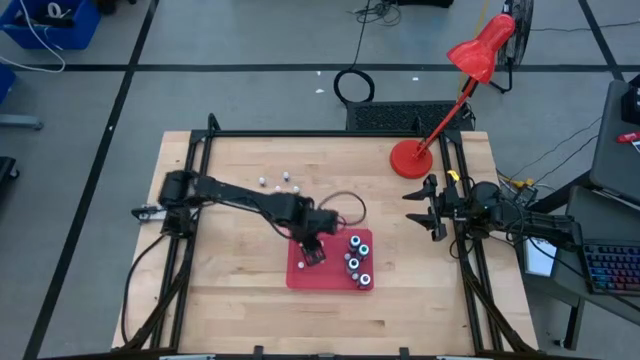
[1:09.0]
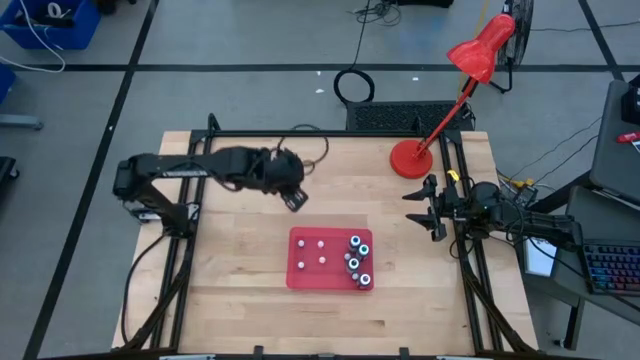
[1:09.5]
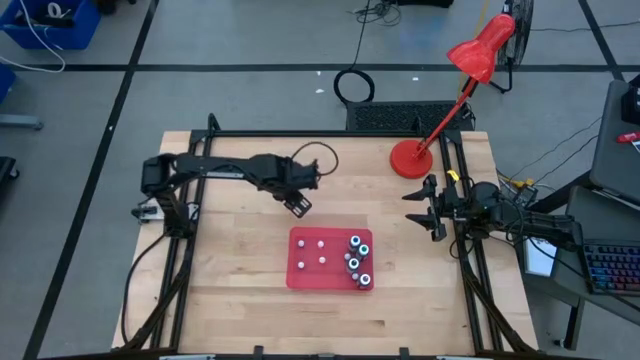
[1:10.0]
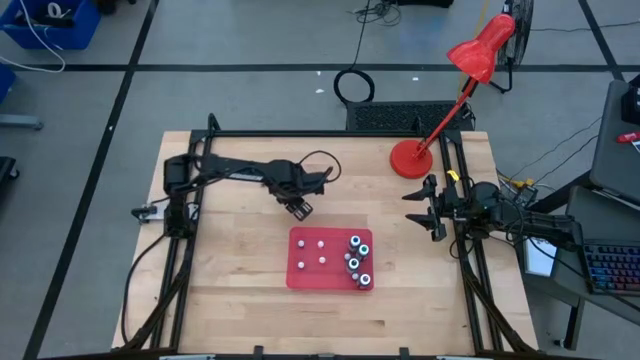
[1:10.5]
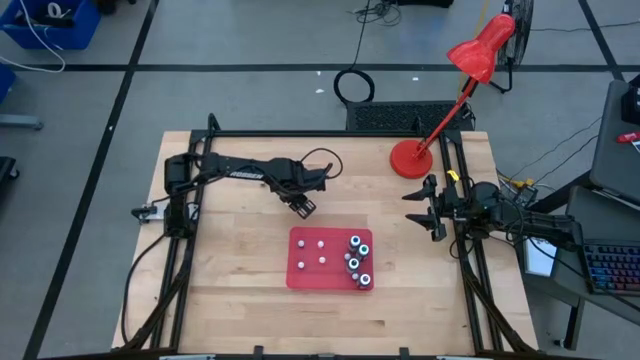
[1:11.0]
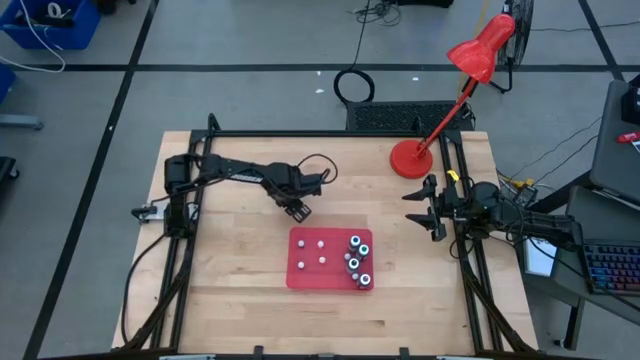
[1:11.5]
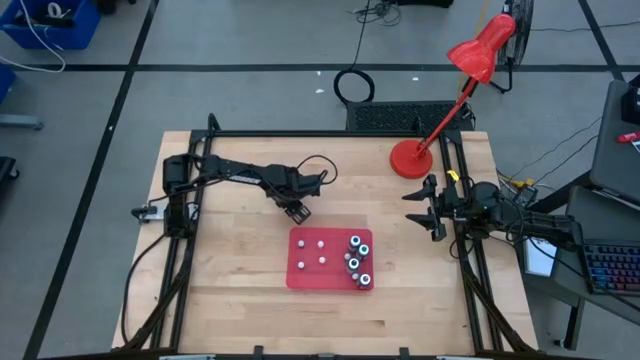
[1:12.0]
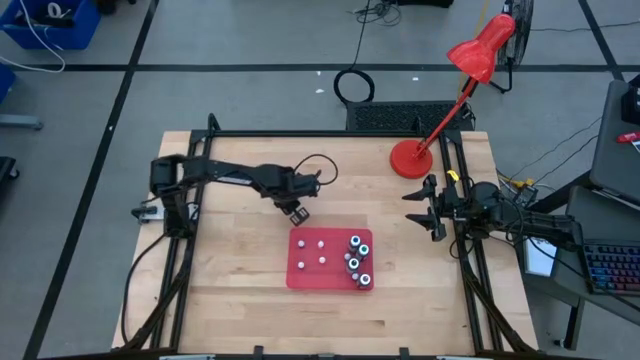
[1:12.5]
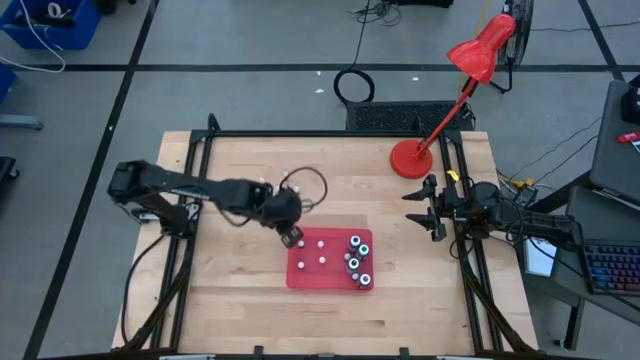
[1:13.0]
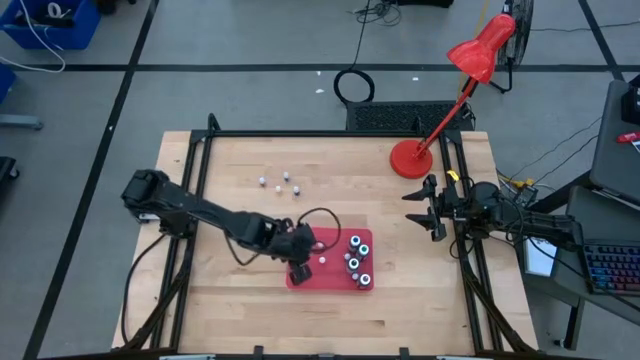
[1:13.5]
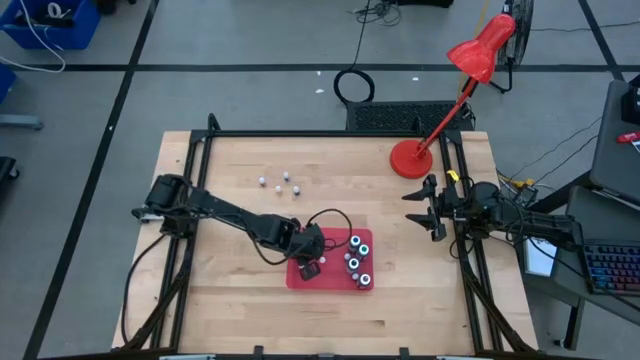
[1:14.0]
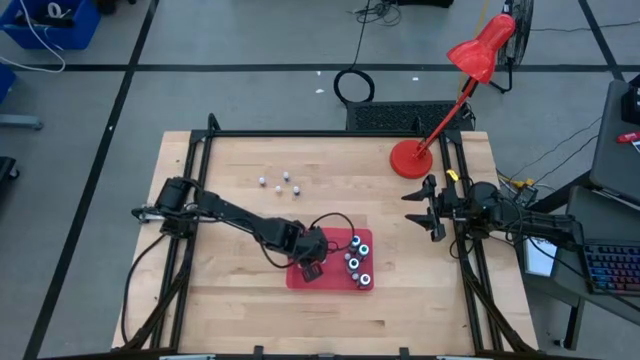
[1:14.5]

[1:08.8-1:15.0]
Task: Pick & Place food coloring
Put the small orange food coloring bottle into the bin

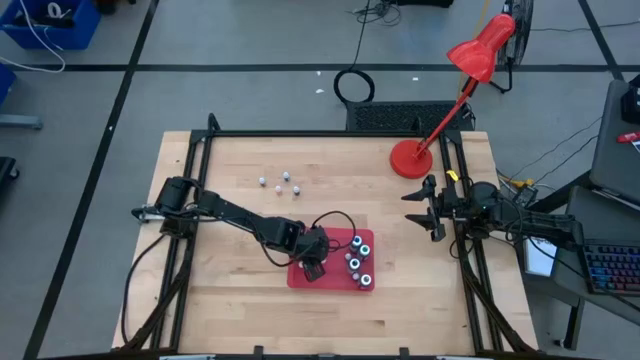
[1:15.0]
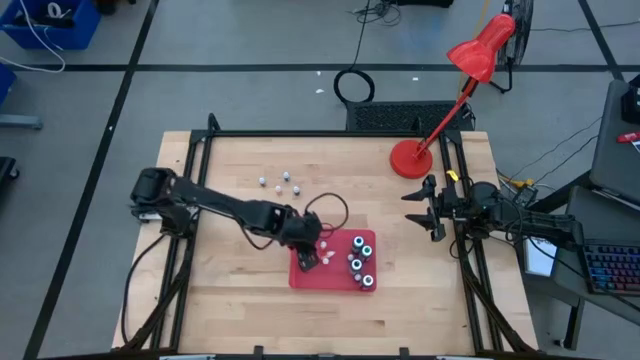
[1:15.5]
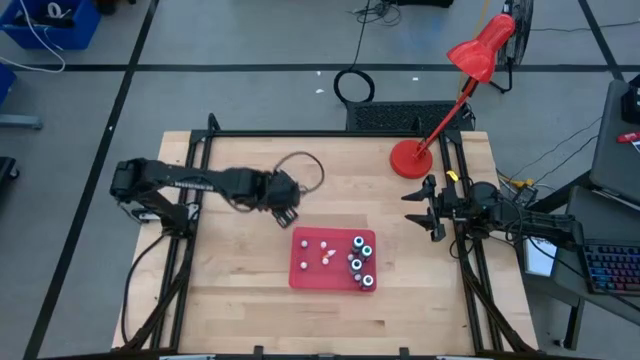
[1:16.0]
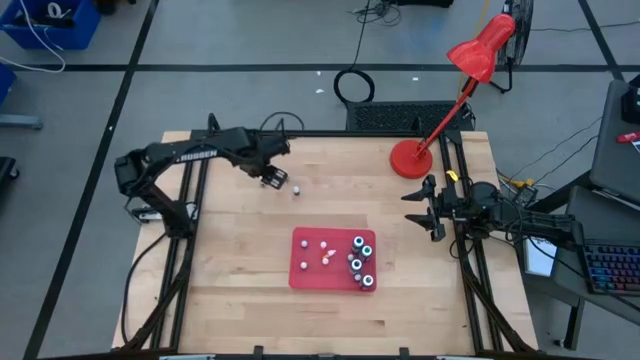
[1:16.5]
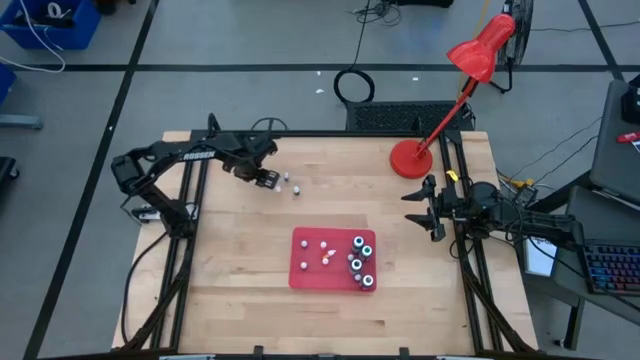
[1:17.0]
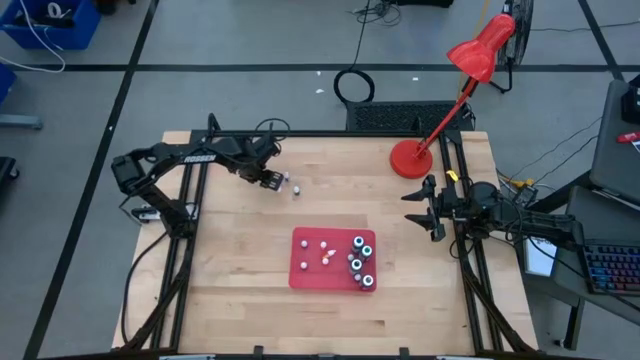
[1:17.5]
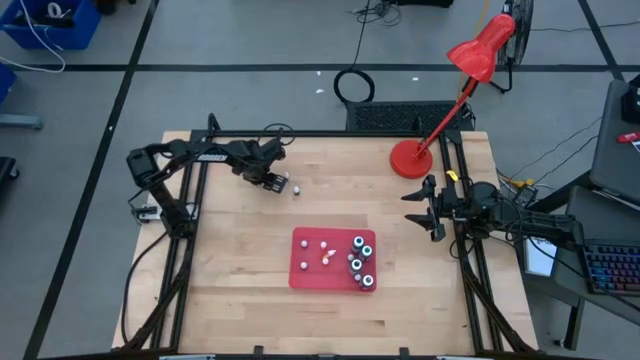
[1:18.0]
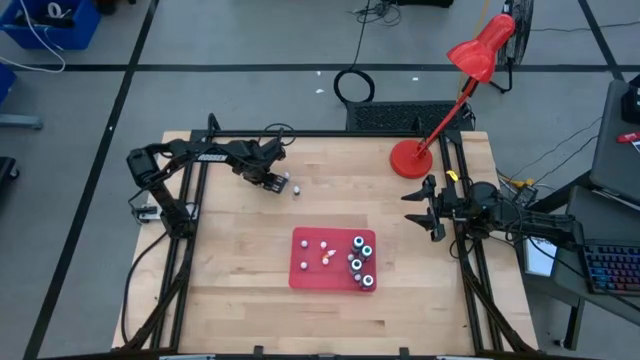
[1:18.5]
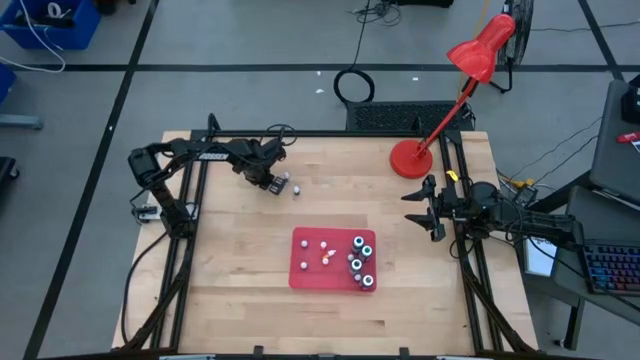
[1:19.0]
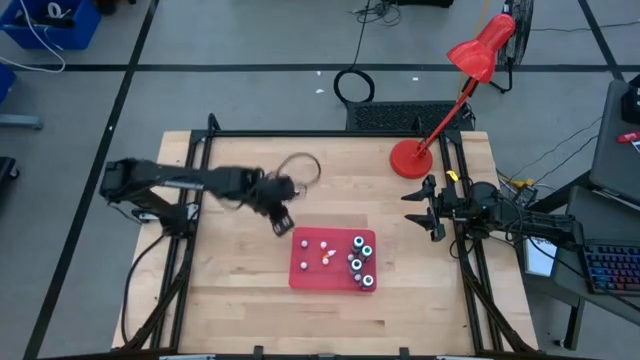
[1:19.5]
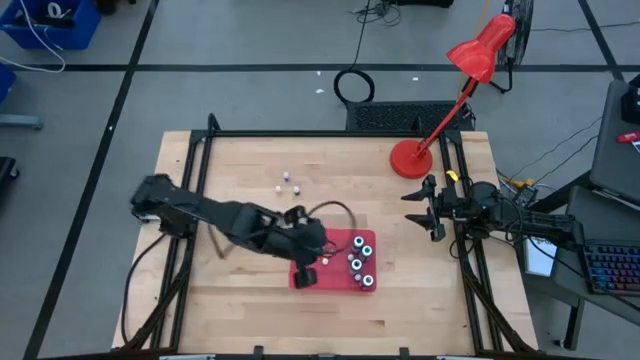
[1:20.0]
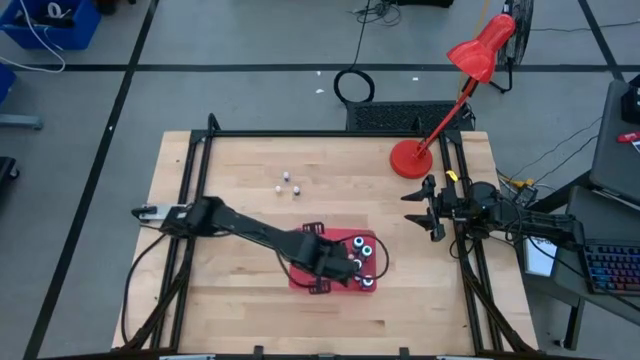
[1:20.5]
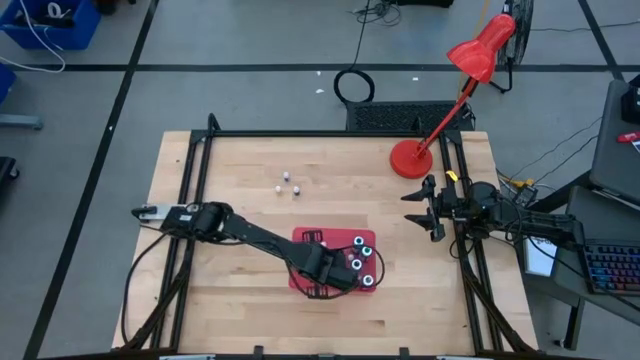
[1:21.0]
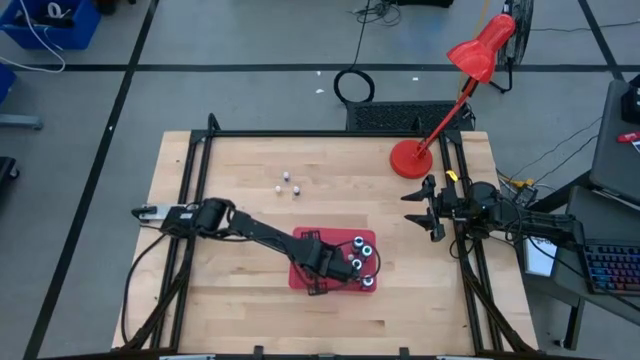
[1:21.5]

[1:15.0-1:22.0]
Put the small black food coloring bottle into the bin

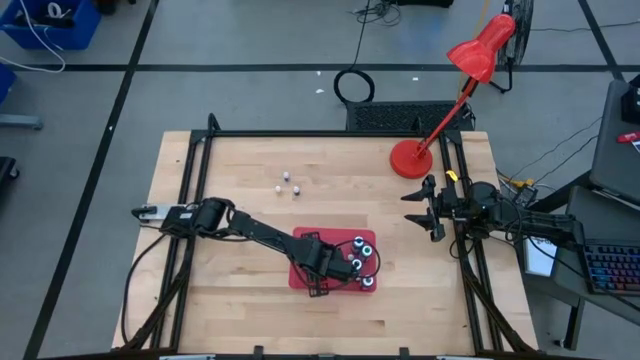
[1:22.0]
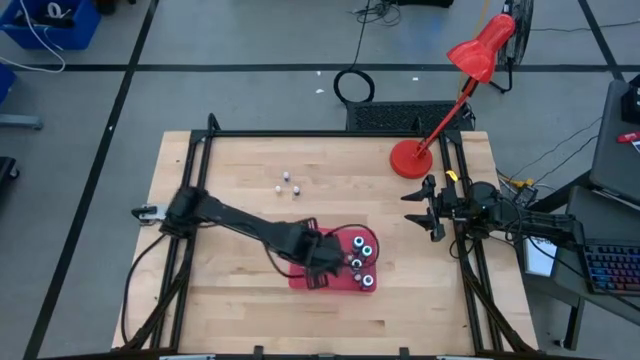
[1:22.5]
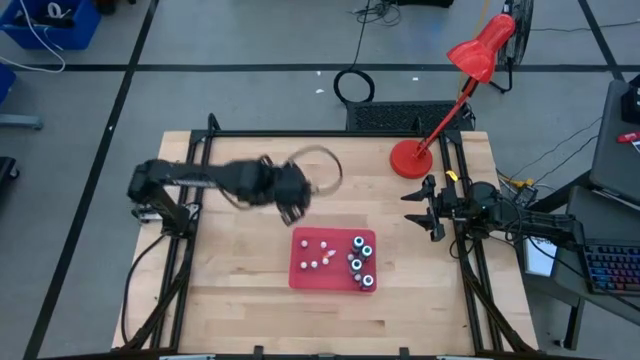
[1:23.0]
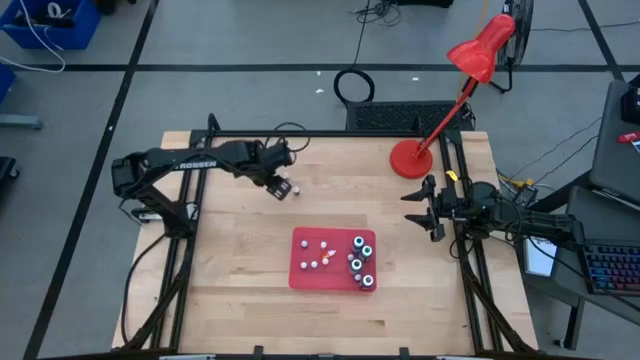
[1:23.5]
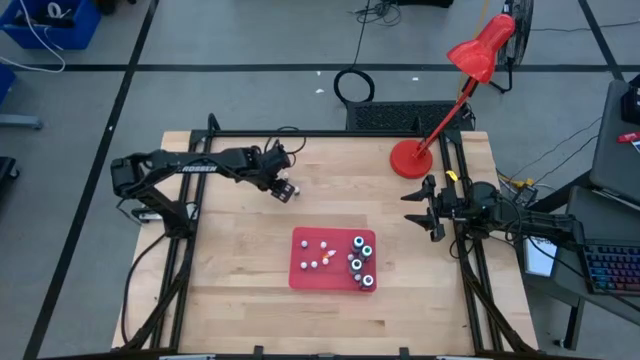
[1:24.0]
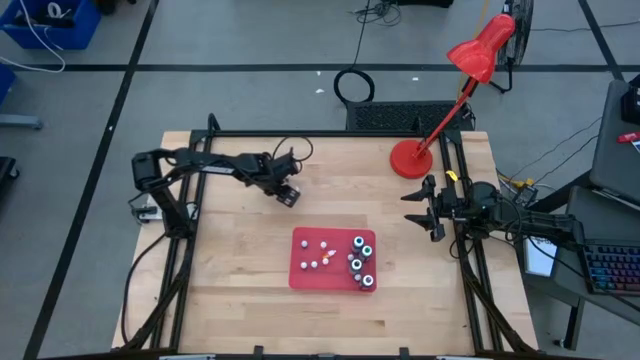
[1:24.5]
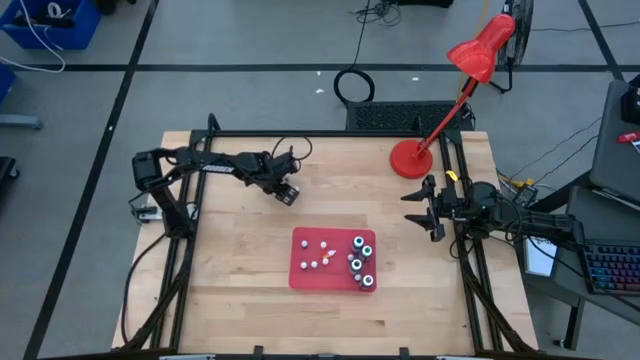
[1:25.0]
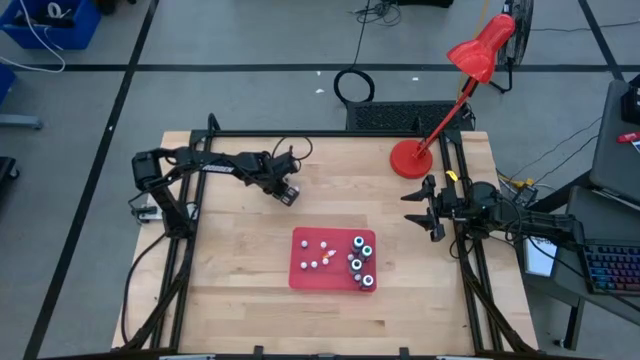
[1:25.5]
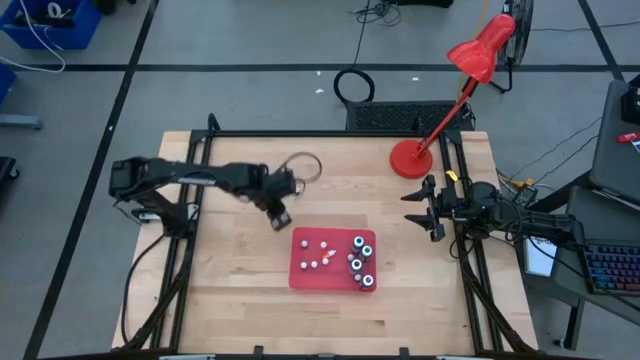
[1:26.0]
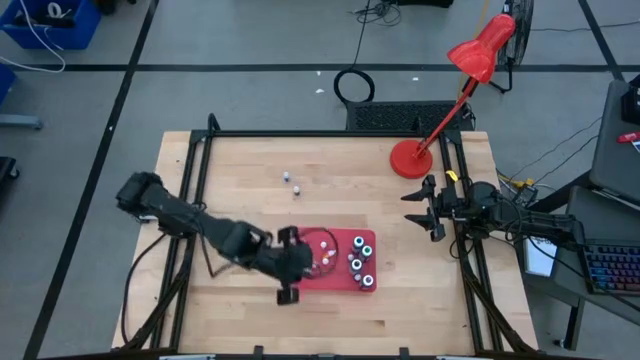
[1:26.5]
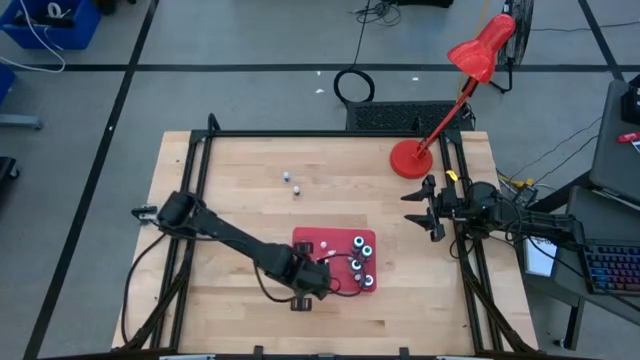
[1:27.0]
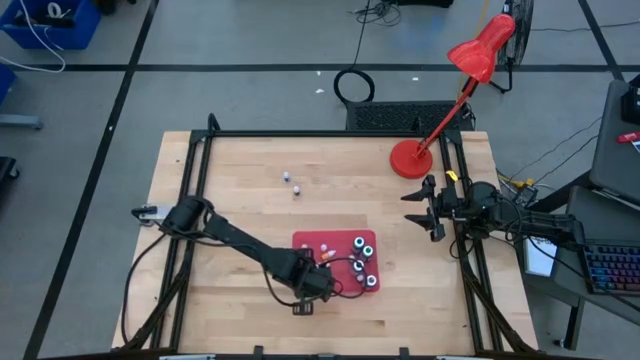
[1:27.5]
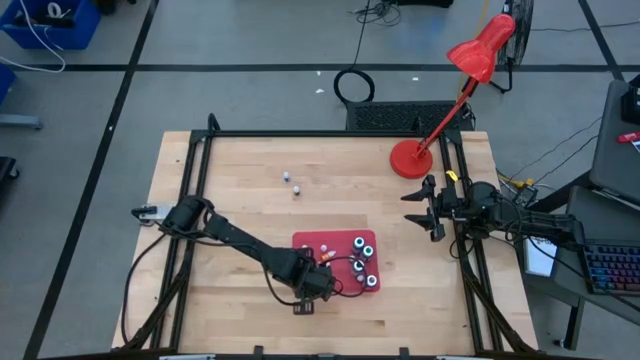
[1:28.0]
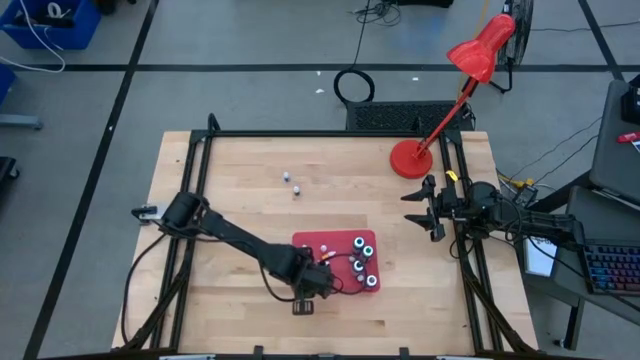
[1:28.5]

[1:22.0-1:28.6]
Put the small orange food coloring bottle into the bin

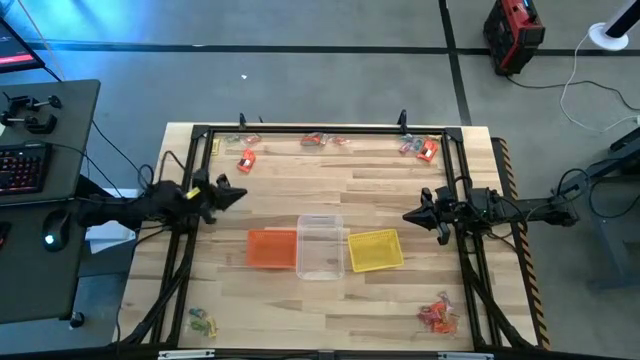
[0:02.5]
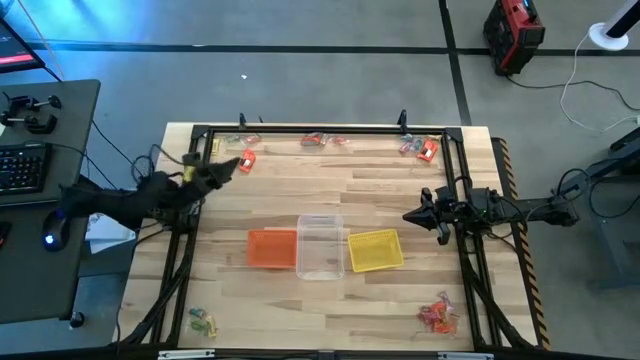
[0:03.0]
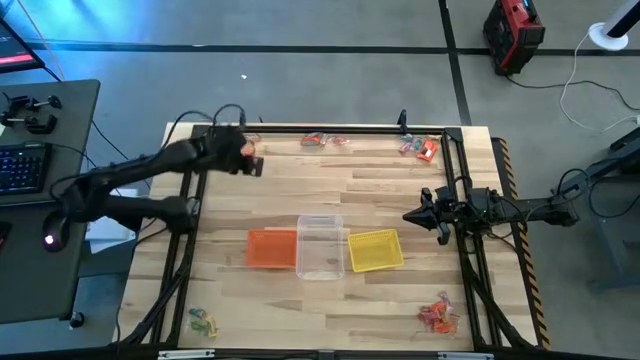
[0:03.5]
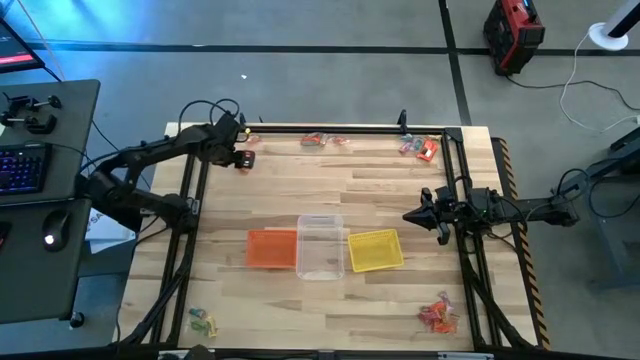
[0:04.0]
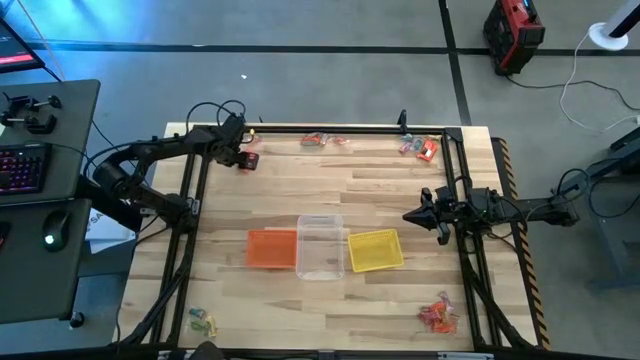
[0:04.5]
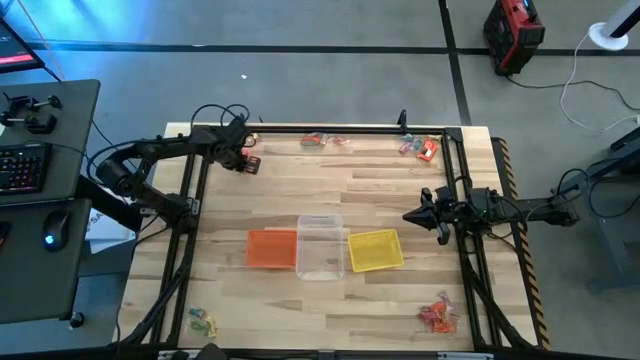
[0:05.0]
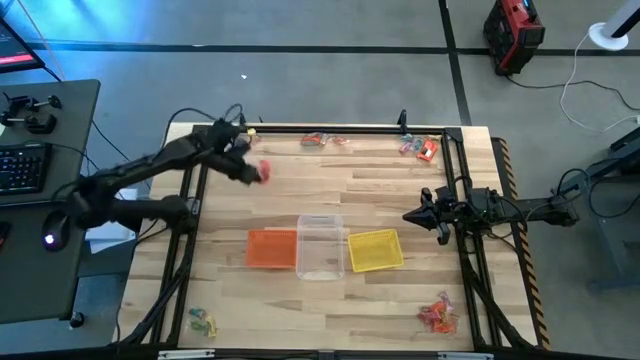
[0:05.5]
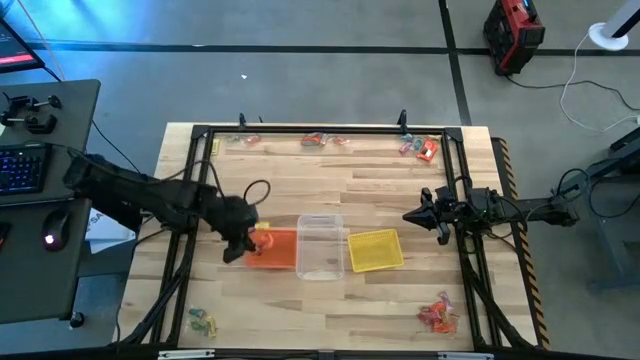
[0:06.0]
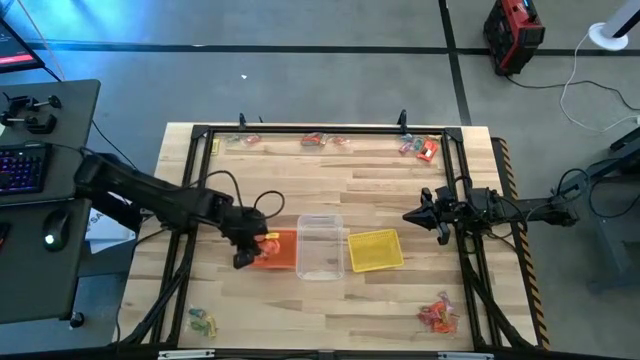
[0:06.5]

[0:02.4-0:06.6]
Task: Sort candy by brand, put in halloween buckets
Put the orange chocolate bar into the orange bin
